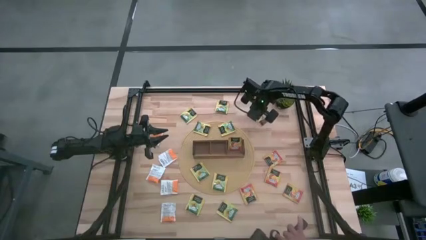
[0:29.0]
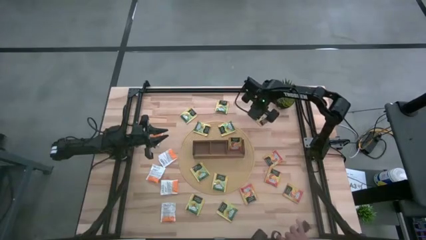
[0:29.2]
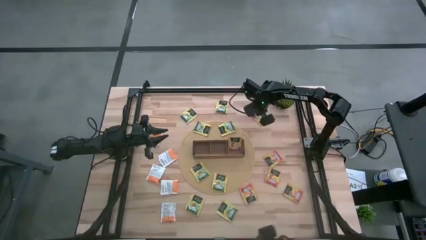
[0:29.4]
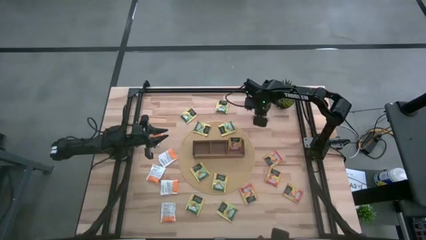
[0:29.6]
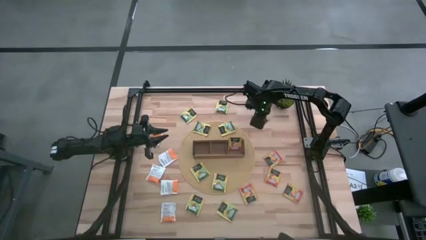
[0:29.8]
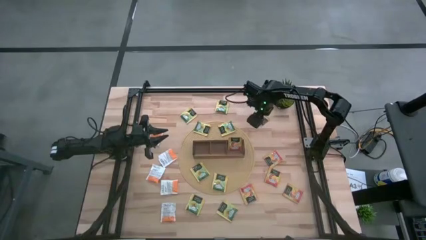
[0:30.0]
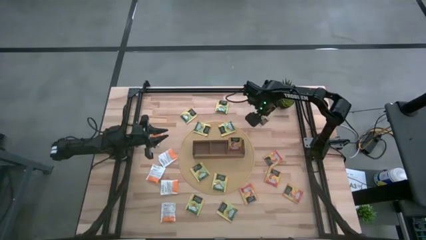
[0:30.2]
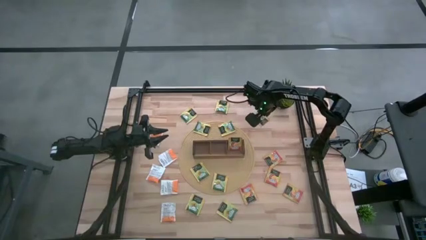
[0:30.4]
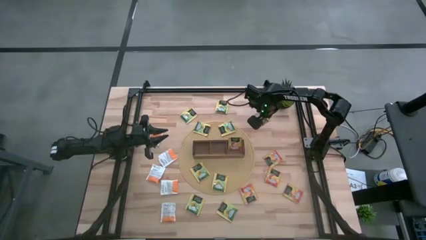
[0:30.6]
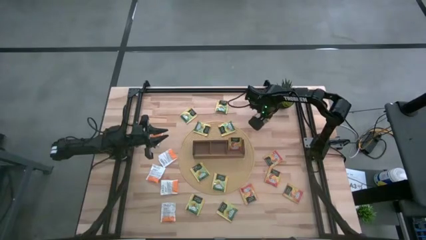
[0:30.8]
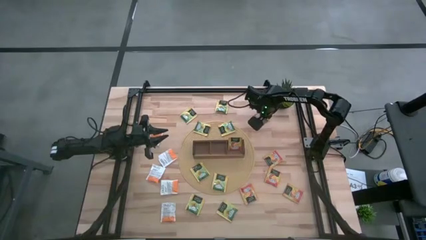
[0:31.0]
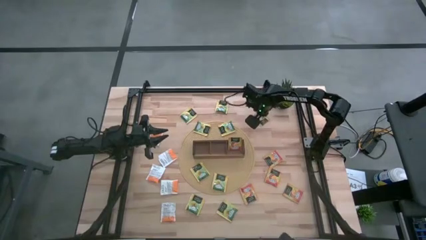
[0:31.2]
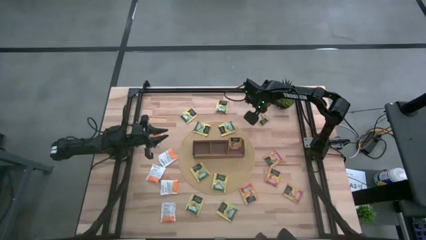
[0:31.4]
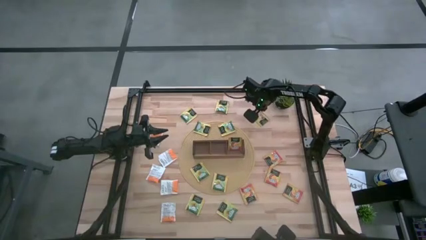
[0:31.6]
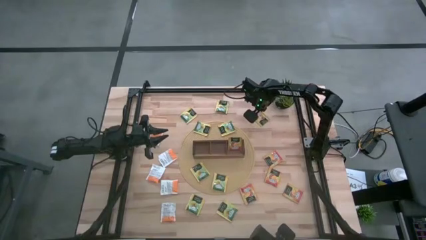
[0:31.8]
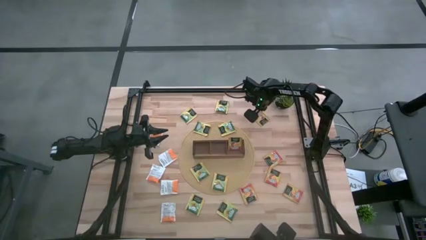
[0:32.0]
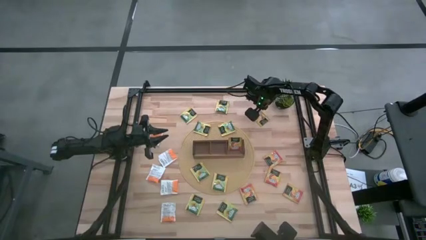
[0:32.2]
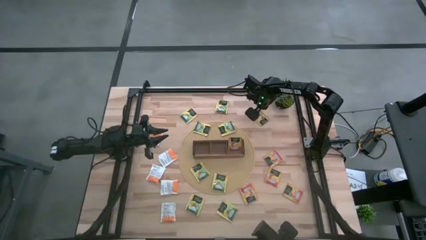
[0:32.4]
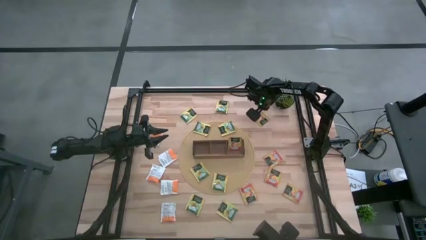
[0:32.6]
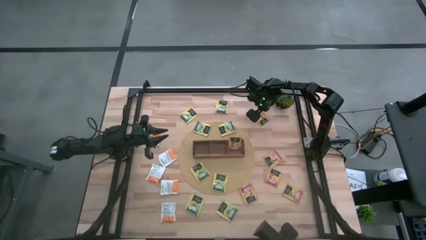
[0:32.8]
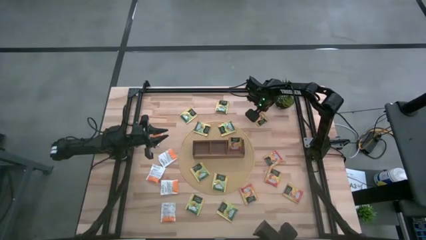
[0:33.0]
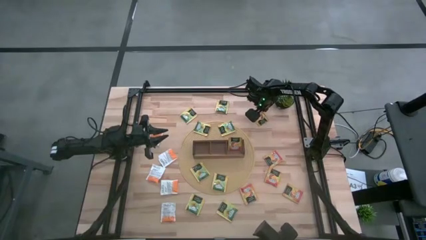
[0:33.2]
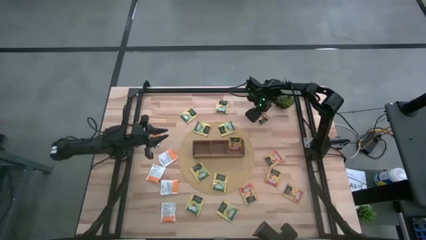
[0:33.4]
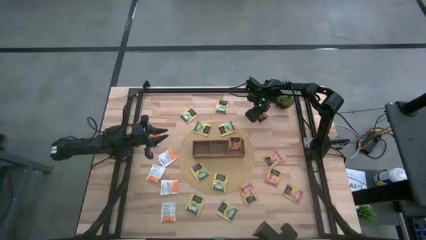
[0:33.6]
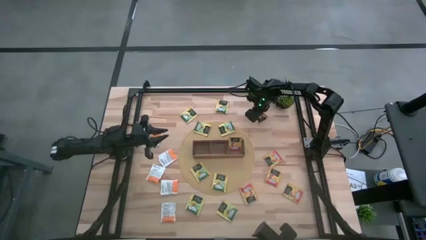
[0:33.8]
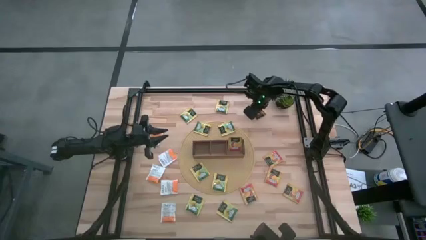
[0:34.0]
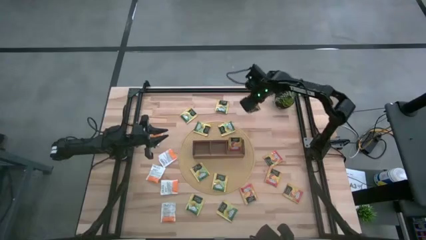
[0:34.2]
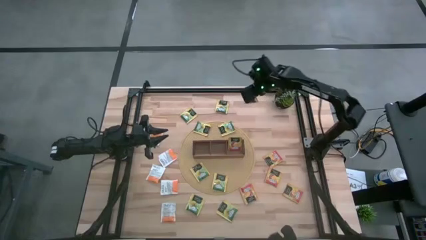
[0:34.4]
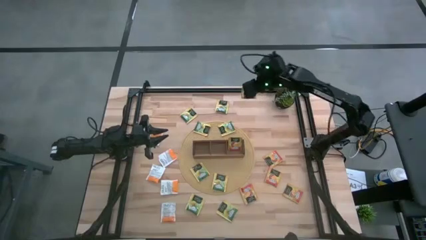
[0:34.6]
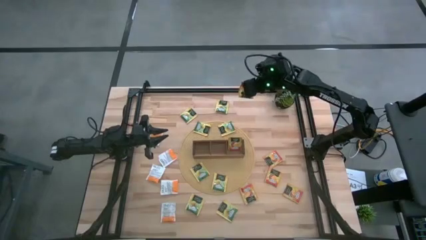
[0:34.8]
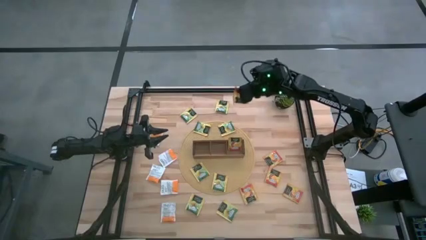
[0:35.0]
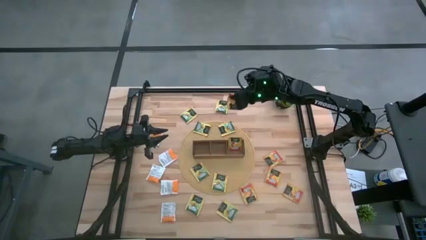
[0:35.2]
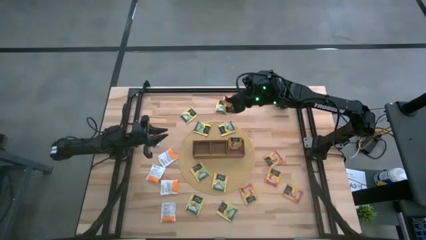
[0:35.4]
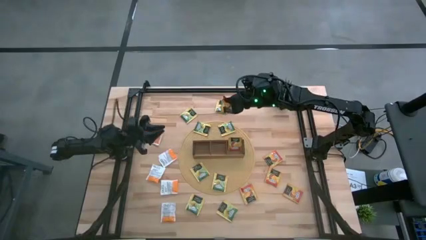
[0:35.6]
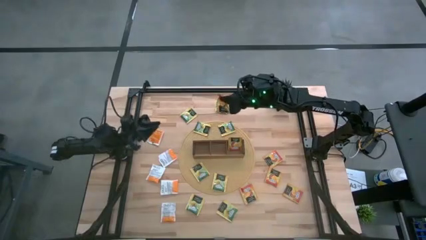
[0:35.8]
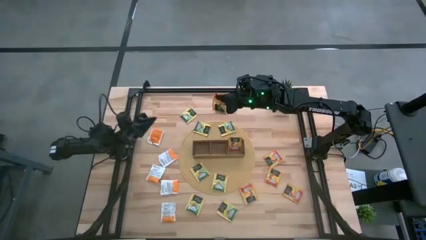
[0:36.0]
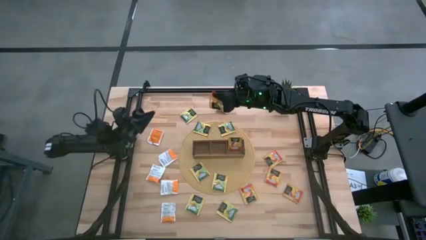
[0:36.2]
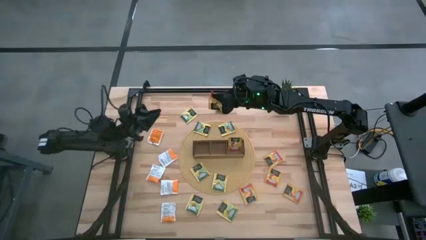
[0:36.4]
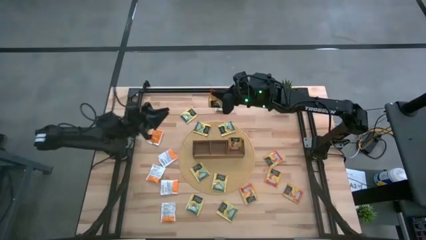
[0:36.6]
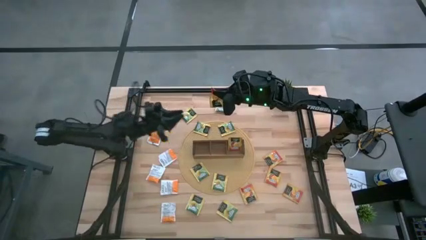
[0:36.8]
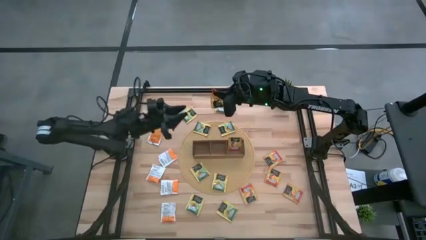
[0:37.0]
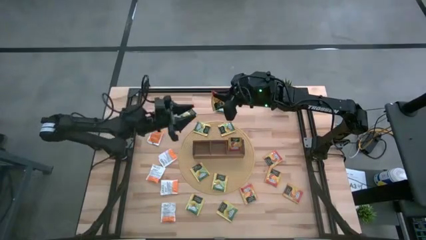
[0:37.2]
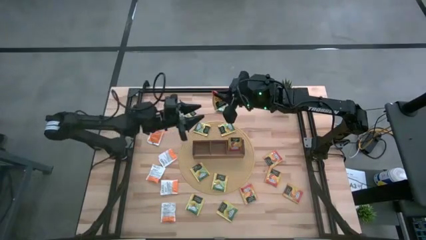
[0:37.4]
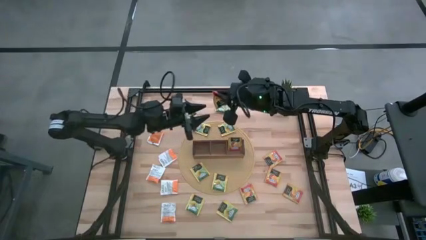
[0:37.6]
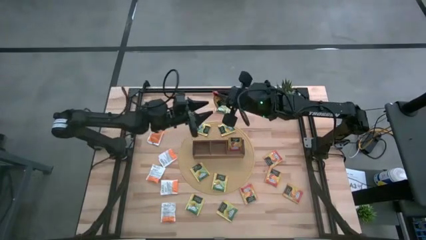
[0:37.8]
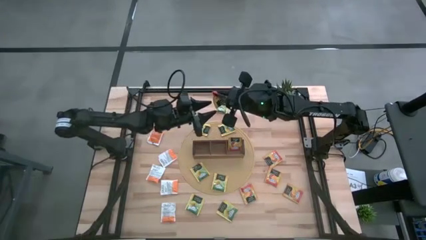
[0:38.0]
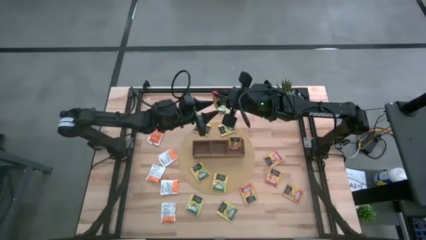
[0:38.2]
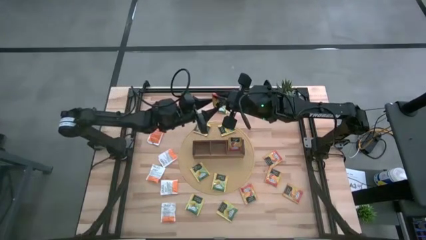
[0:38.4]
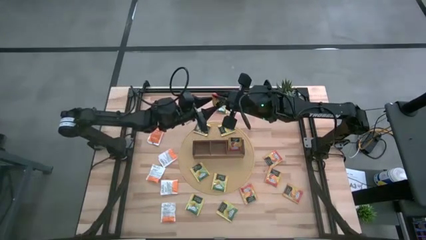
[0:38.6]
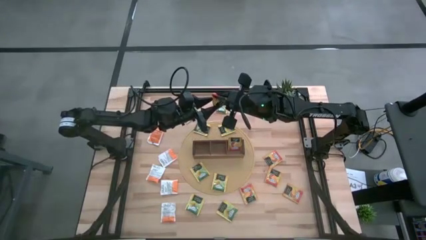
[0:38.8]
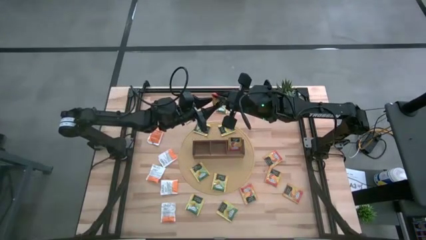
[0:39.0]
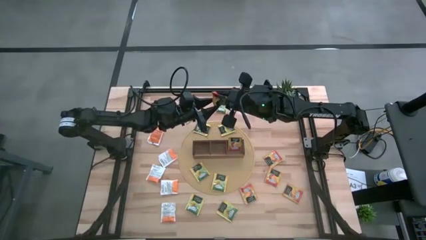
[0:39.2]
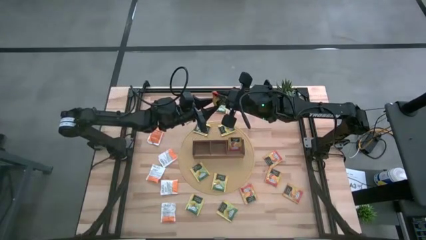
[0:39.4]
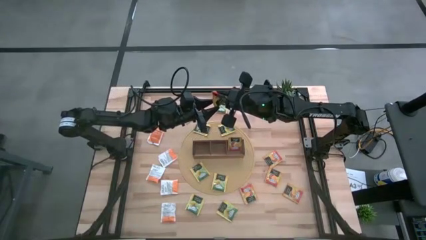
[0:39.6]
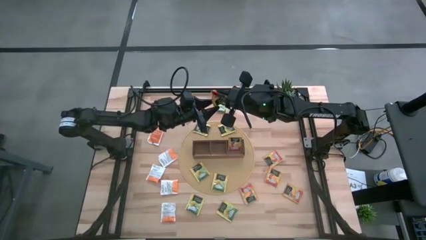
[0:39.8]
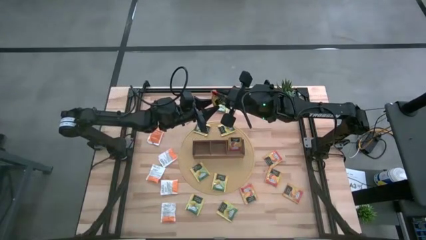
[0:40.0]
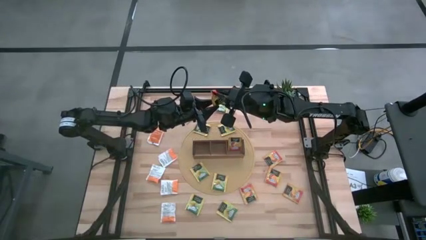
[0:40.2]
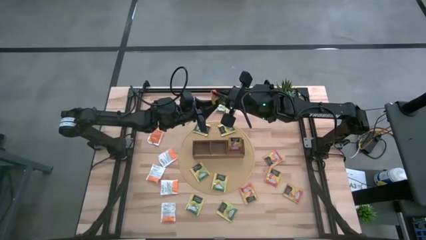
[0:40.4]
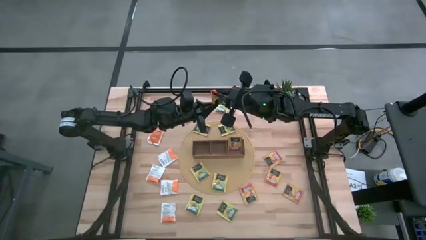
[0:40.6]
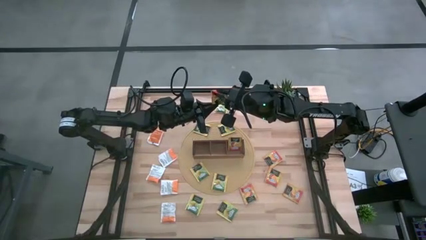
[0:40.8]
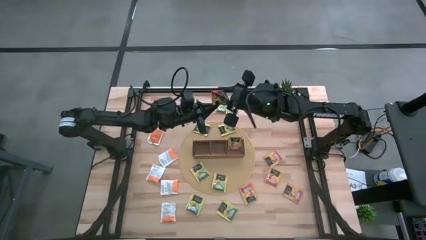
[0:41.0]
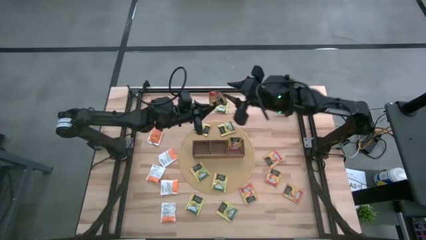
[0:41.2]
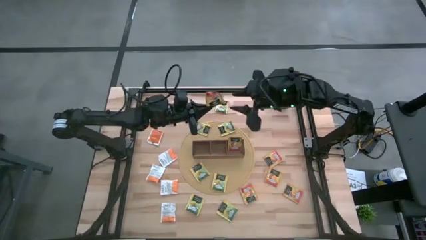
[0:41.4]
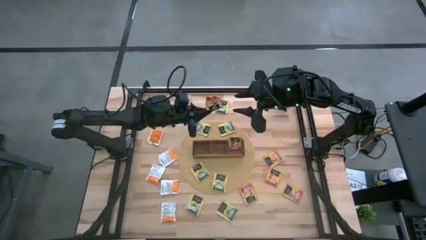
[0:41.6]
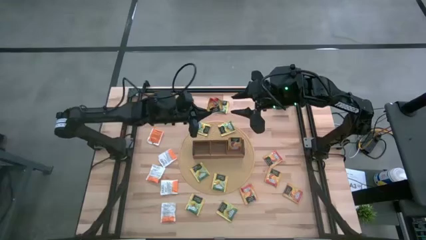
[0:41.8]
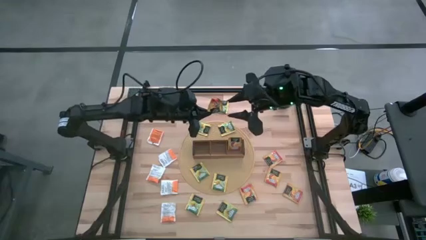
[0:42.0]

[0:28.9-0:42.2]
Task: Pick & Place Tea
Put the orange tea bag into the right section of the wooden organizer

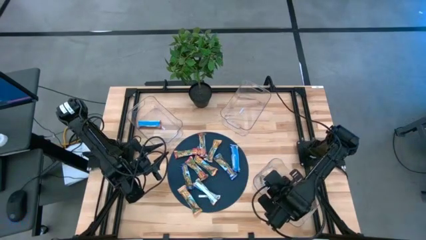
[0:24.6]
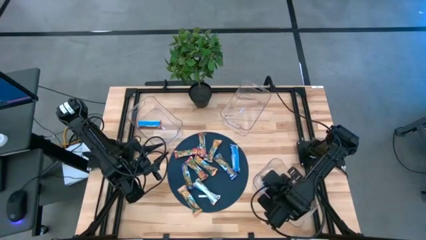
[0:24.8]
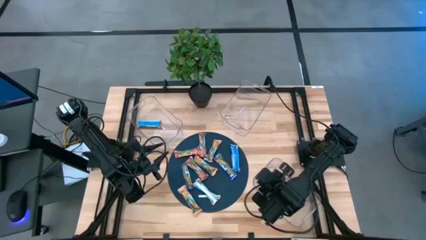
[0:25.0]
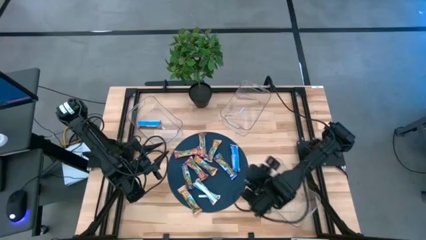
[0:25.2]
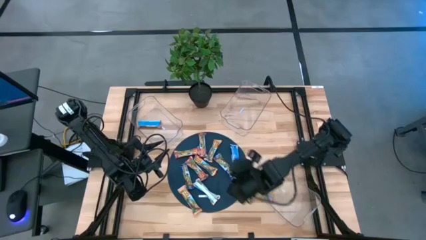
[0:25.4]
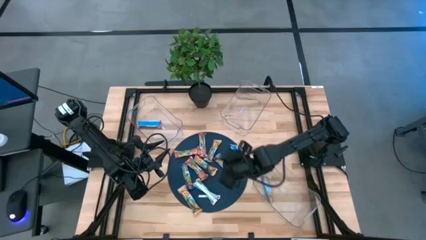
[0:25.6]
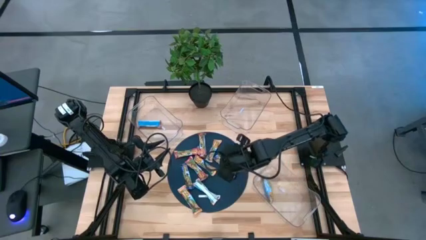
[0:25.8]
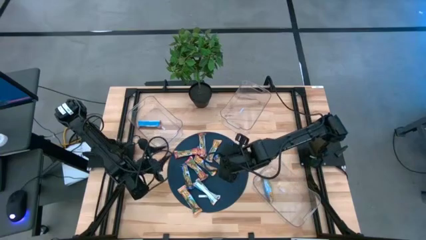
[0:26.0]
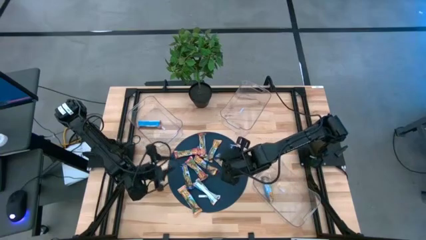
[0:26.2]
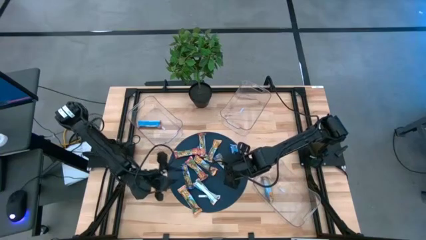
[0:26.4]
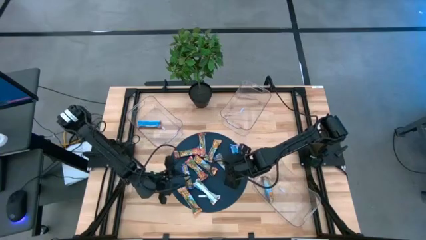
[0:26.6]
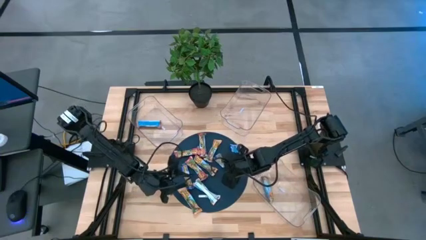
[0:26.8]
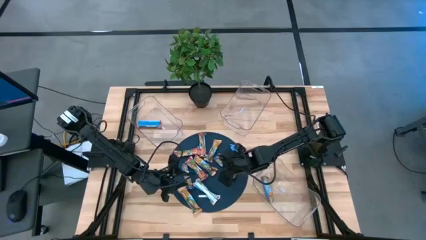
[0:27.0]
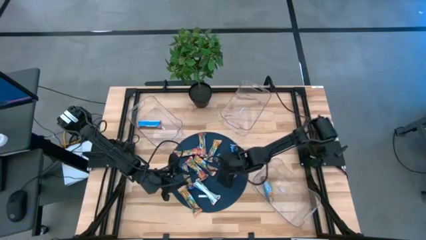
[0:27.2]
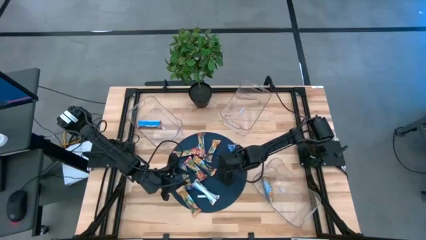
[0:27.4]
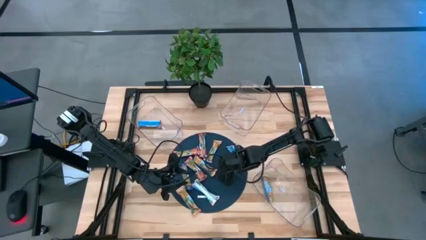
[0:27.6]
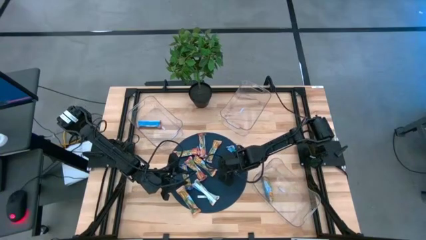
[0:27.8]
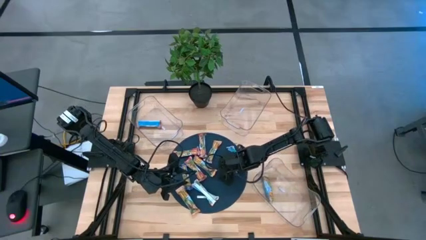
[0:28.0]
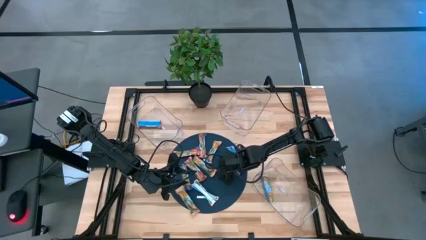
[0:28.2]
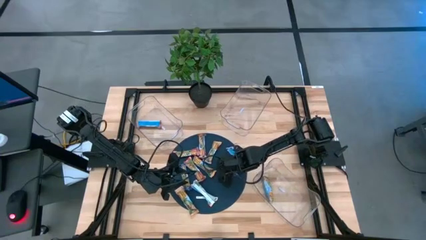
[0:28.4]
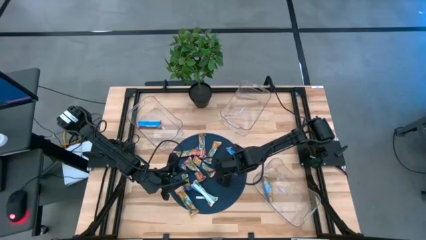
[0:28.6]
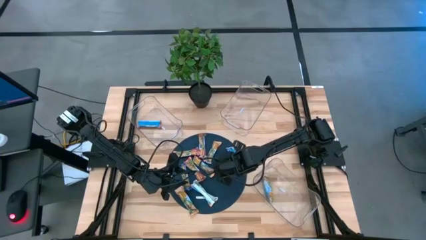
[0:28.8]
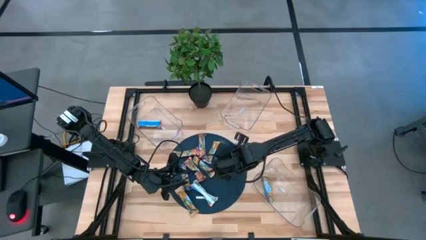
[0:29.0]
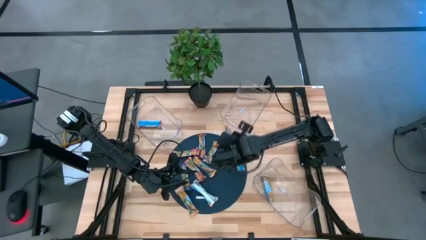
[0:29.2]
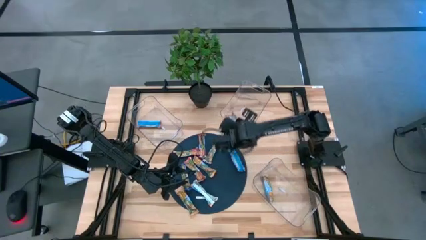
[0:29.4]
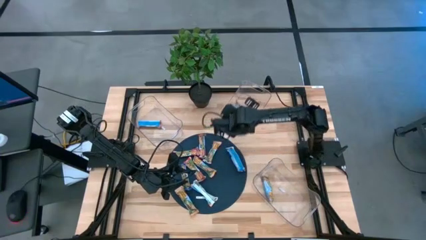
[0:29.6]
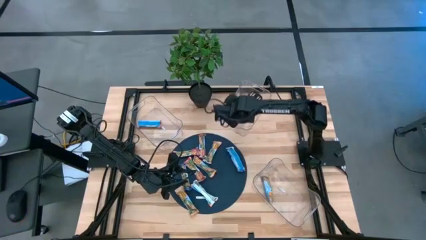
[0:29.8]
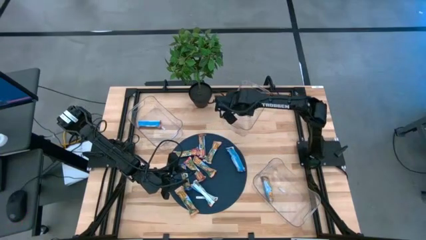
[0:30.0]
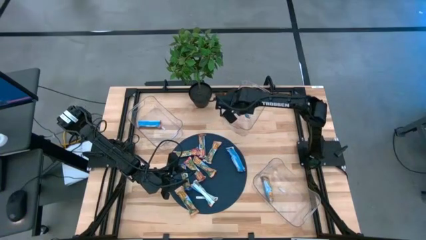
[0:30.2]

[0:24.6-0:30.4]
Task: Pick and place Granola Bars by type
Put the blue granola bar into the top right transparent bin
